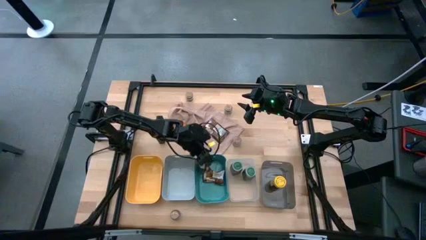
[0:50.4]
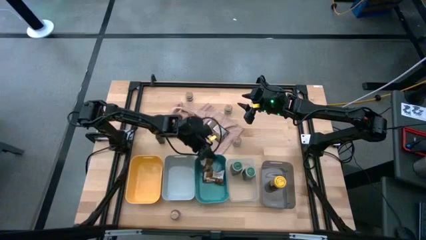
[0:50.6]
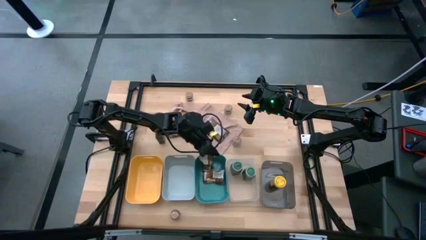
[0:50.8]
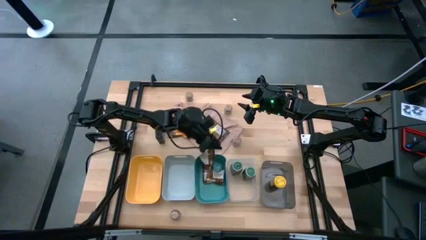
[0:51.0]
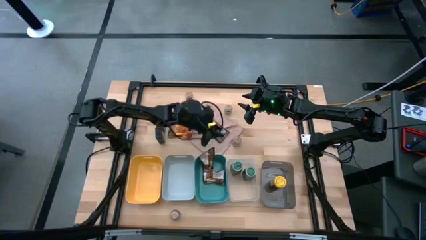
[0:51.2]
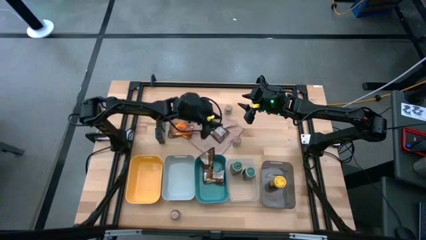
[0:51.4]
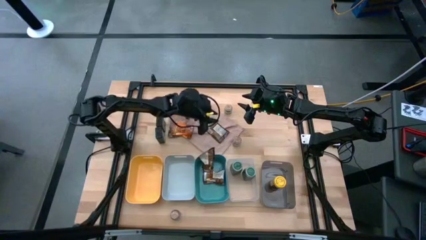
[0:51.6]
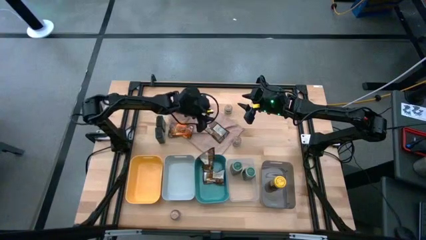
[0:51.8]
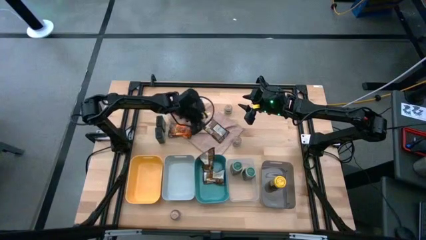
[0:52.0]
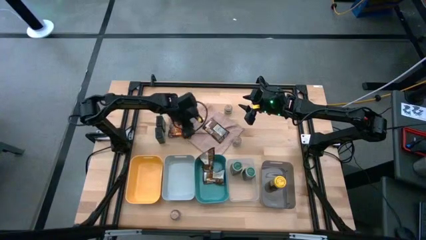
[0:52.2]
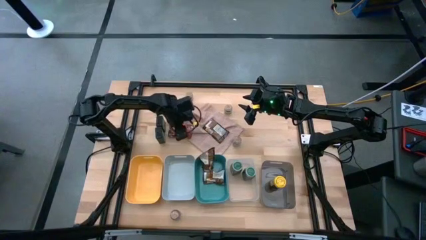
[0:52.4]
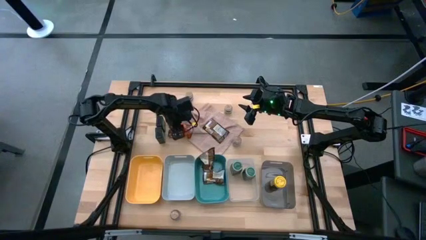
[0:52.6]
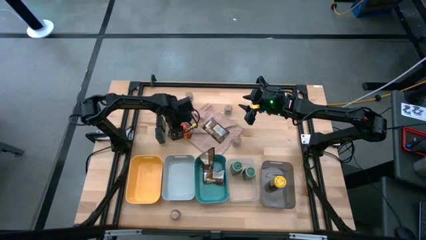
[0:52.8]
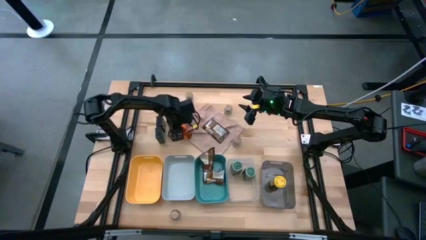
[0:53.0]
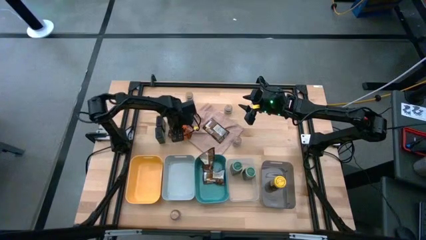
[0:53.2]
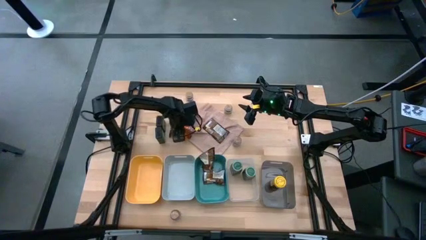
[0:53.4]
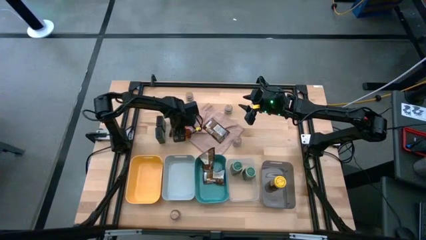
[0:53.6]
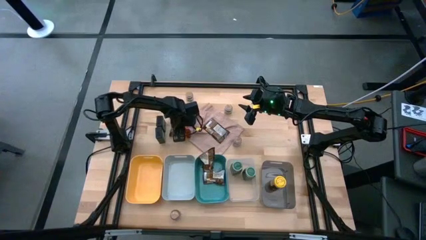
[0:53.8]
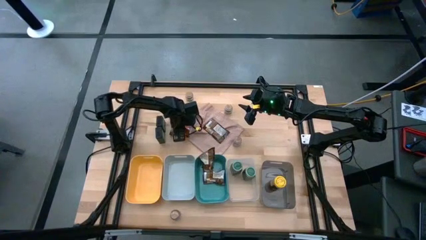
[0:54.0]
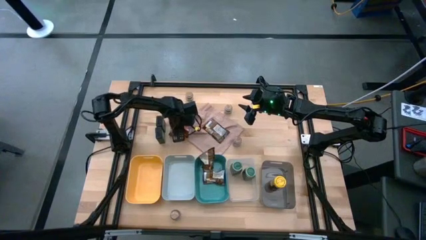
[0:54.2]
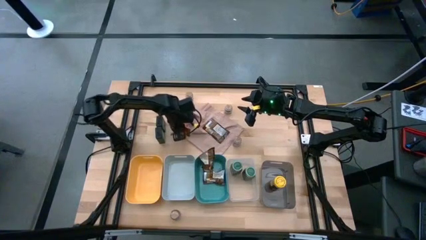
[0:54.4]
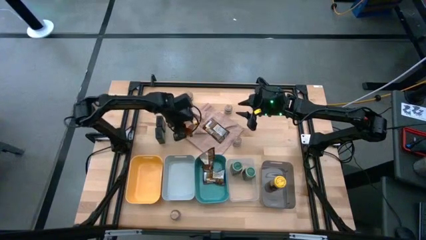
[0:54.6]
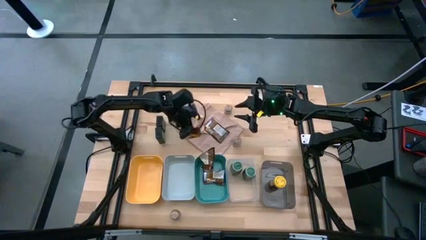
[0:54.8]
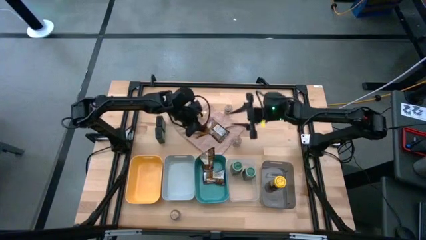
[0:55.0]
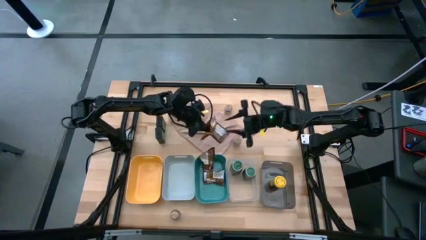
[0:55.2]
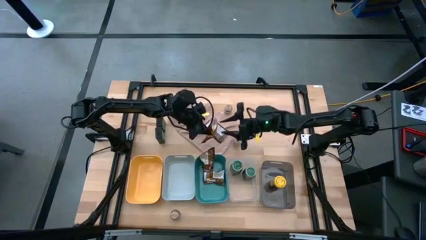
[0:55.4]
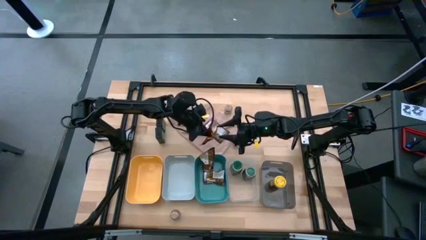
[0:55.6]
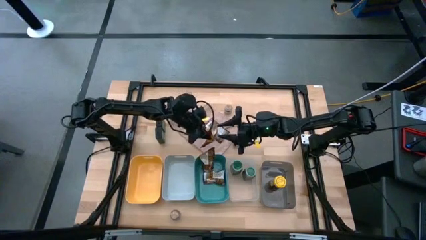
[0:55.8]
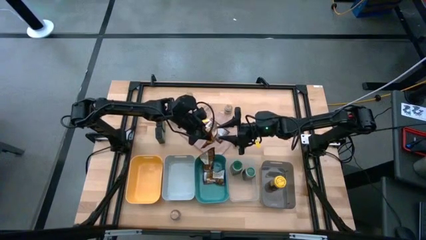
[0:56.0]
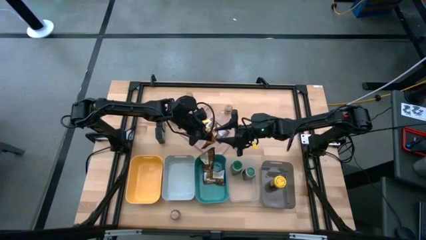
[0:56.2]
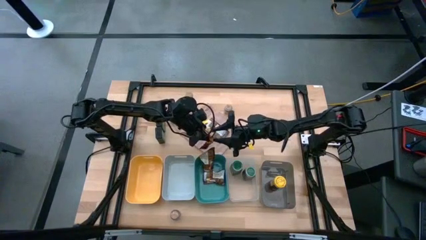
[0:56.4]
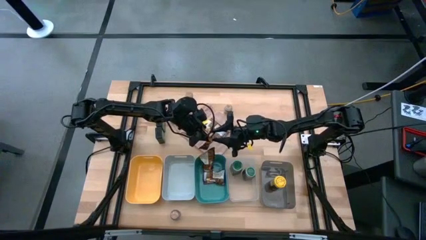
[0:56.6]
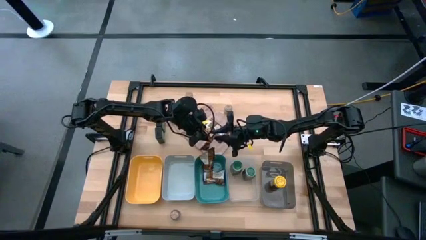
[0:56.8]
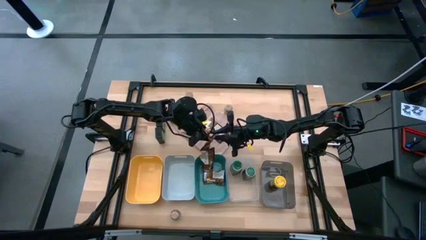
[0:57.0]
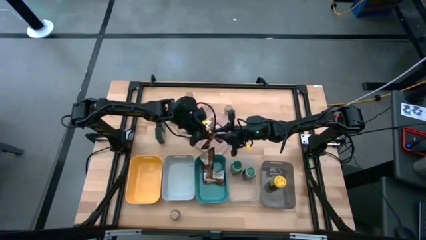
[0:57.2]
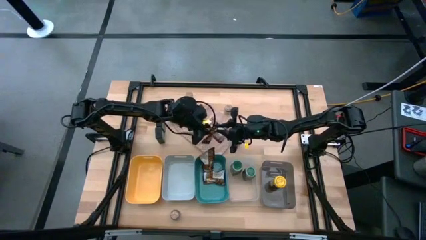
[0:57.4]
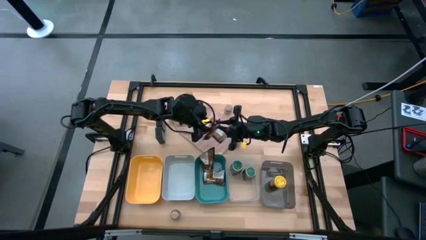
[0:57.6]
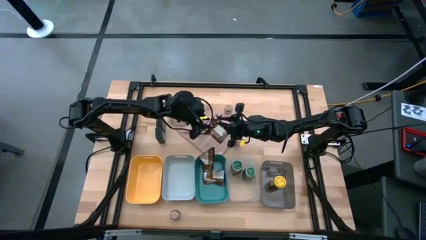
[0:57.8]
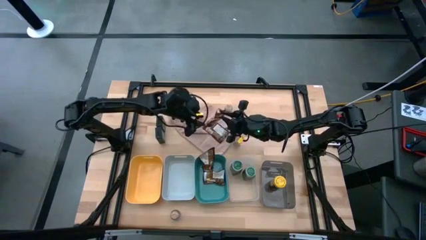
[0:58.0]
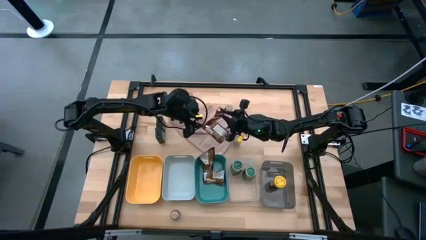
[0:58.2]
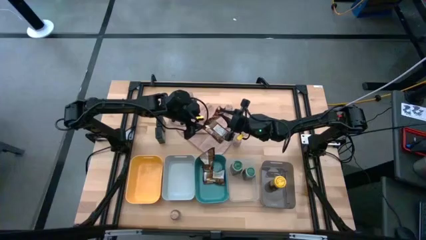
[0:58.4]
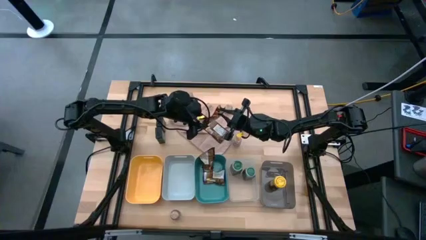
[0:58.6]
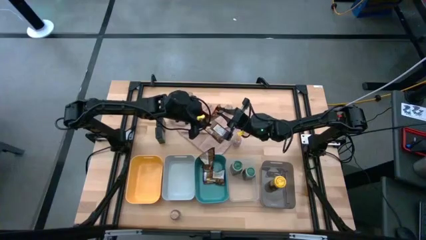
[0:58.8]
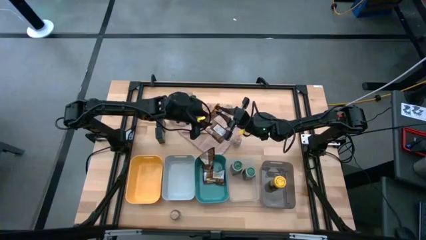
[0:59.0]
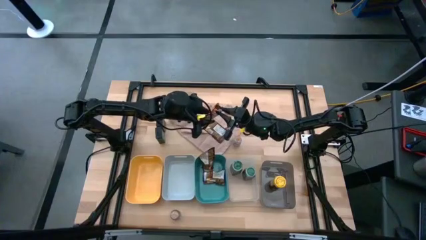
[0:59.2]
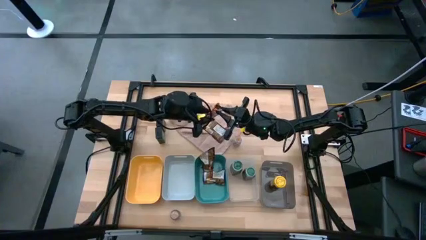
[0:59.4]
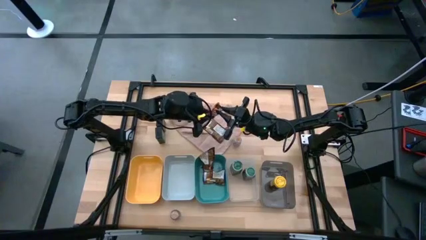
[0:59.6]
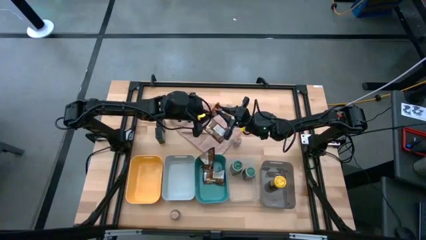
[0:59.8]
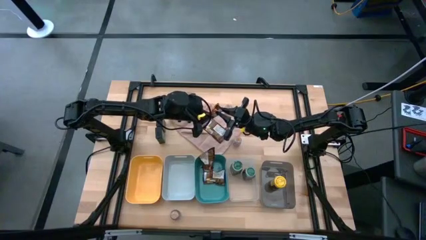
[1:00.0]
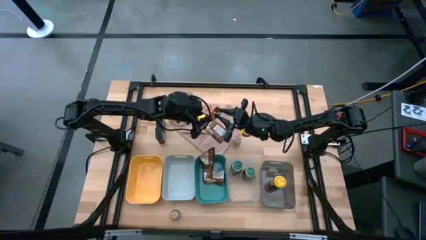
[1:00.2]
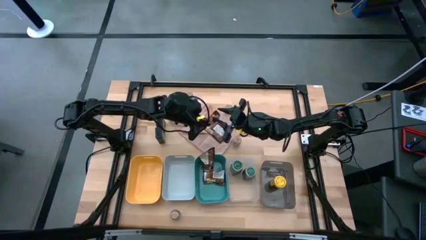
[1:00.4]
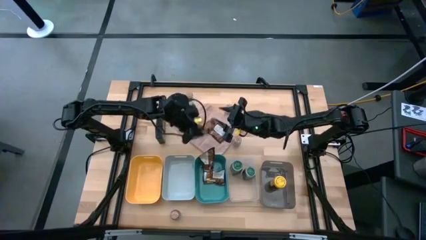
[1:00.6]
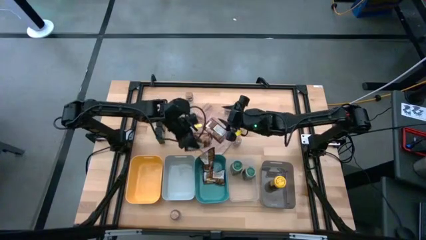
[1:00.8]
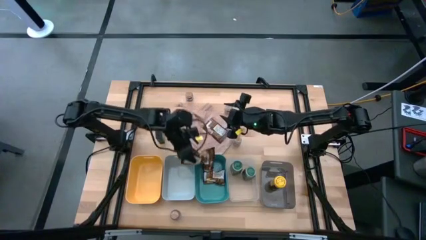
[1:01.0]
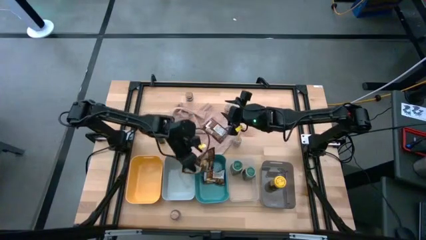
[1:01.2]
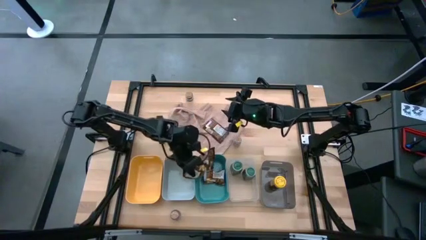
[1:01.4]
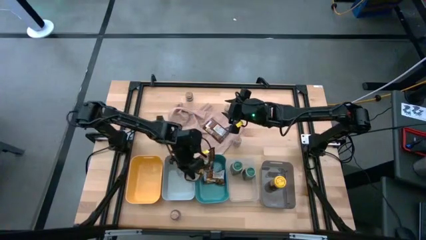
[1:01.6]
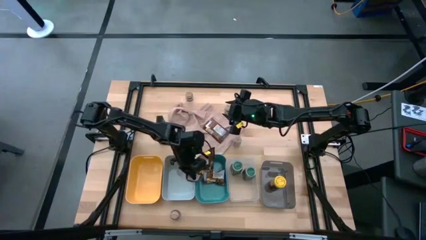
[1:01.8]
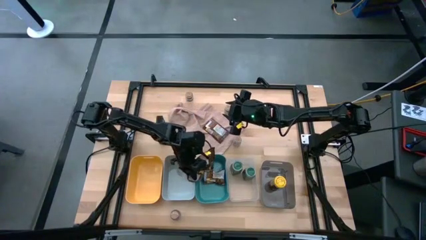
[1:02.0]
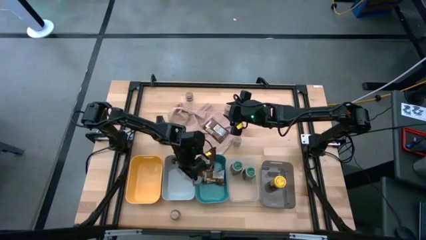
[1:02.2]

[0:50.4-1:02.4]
Task: Sort spices by type
Put the orange seasoning bag into the green bin

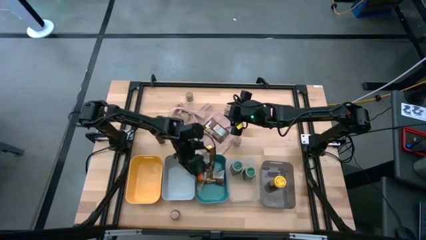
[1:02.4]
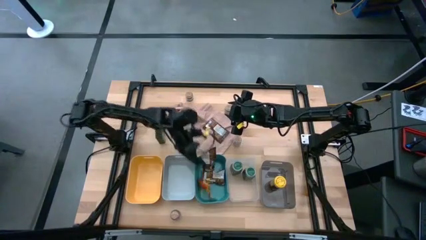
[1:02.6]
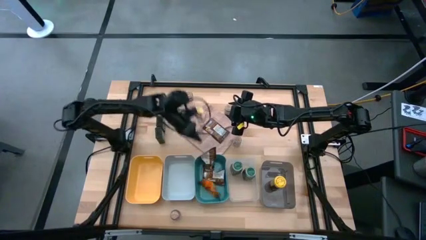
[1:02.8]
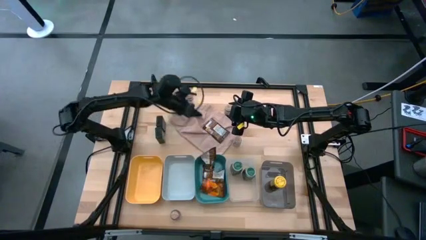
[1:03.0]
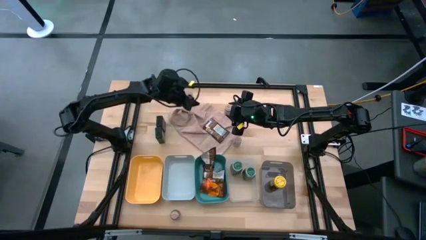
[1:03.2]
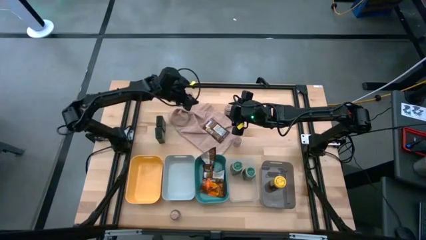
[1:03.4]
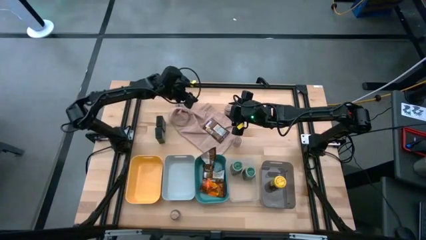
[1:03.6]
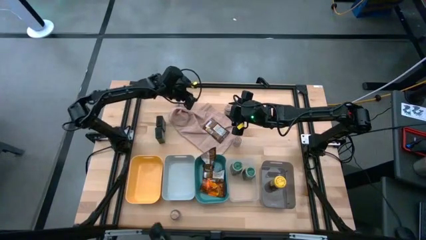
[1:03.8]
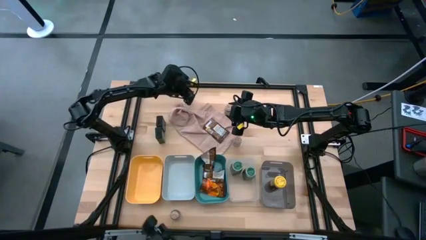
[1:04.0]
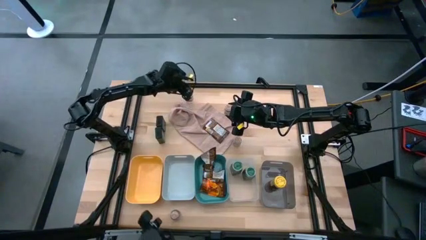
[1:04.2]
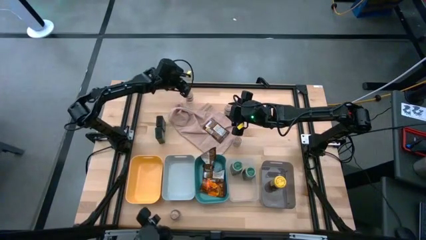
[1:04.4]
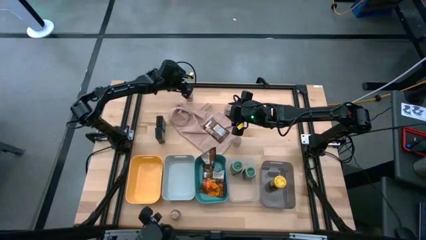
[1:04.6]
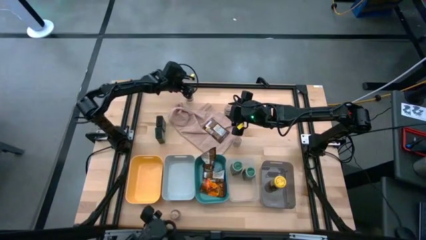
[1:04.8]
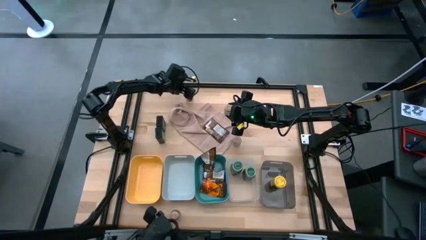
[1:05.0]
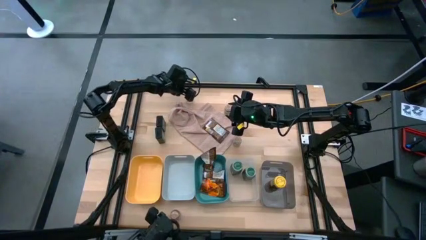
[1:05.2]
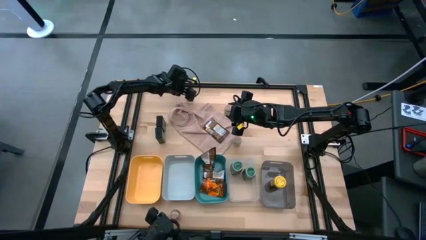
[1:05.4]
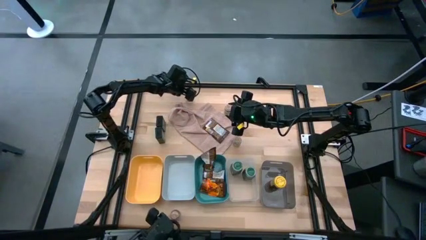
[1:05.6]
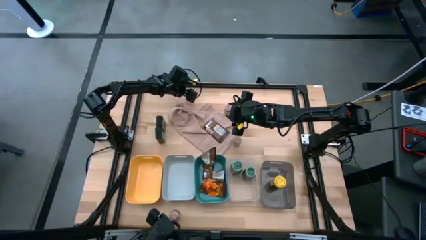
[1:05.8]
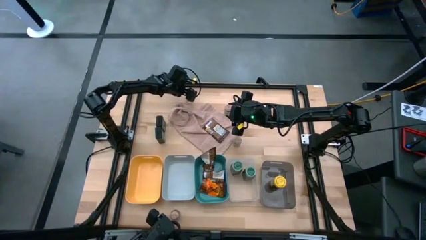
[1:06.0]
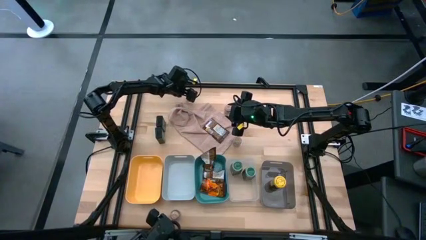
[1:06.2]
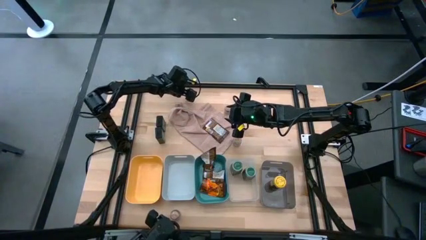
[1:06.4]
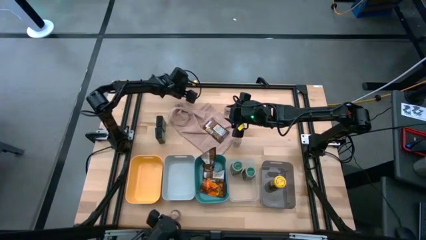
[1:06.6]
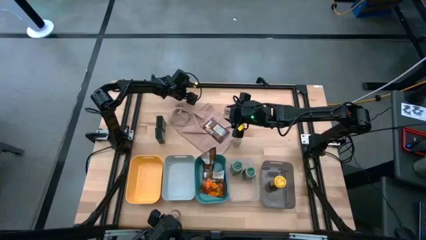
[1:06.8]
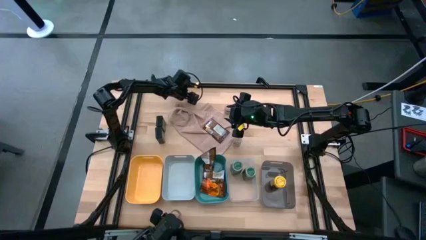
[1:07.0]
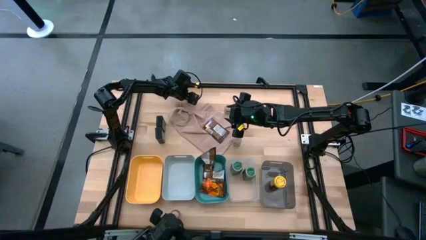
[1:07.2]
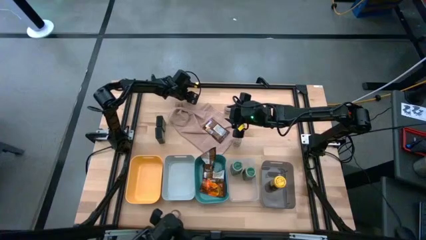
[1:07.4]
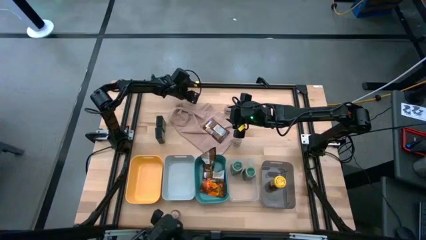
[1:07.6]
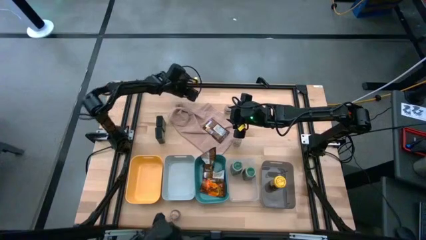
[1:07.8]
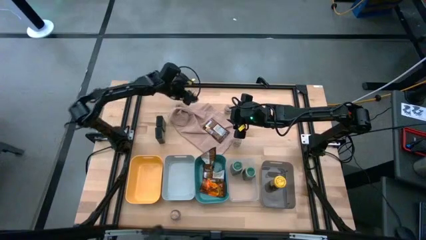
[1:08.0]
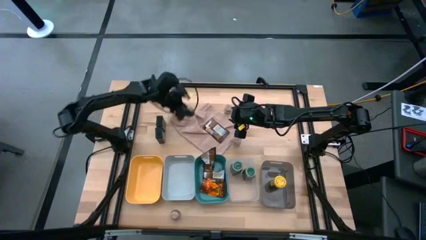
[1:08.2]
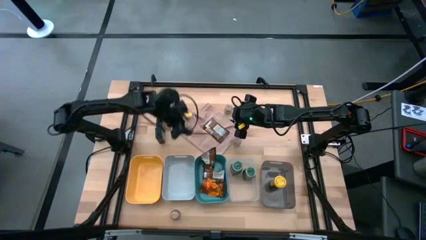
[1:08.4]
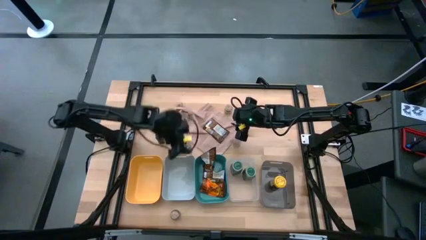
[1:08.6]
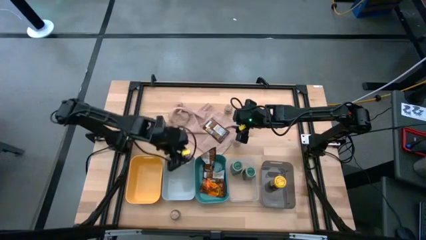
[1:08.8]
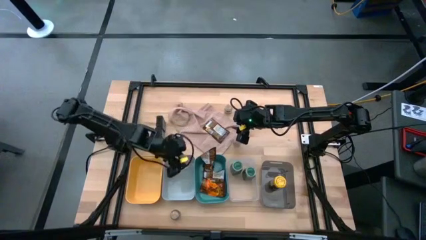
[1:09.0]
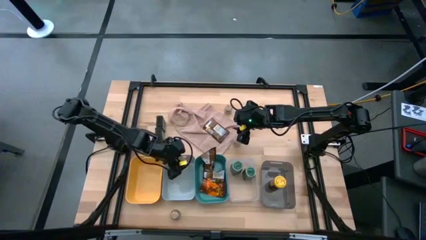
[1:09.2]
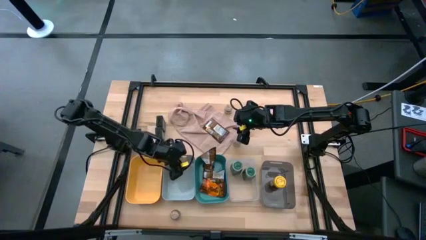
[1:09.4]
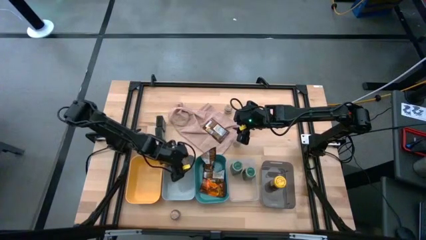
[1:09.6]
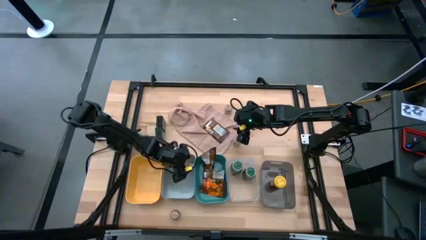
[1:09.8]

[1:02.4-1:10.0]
Put the brown seasoning bottle into the gray bin
